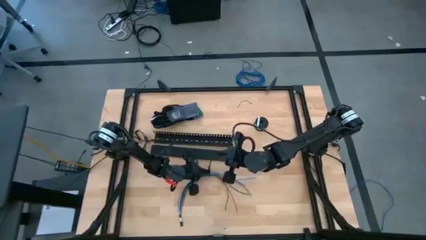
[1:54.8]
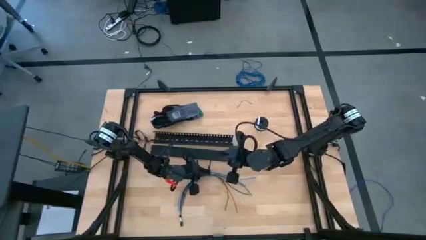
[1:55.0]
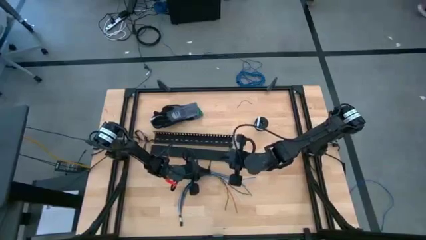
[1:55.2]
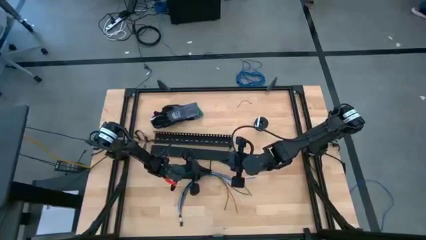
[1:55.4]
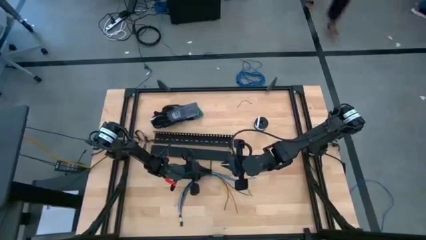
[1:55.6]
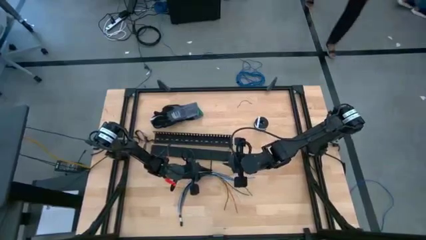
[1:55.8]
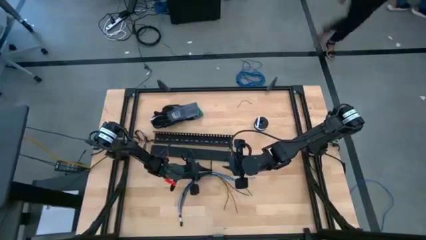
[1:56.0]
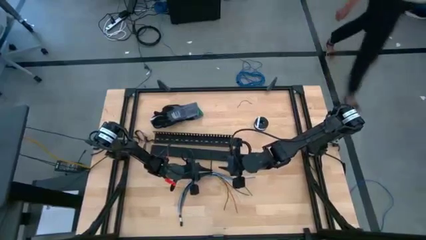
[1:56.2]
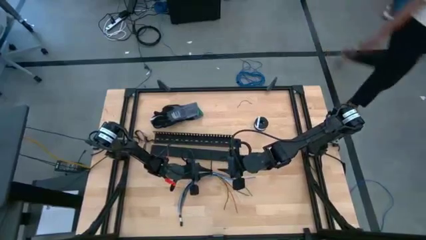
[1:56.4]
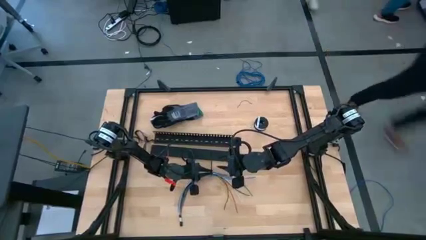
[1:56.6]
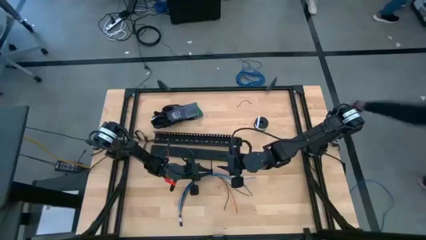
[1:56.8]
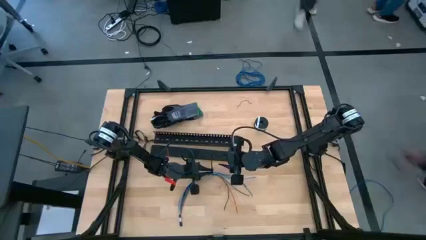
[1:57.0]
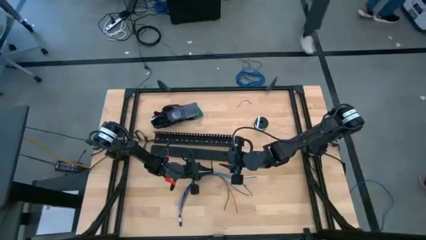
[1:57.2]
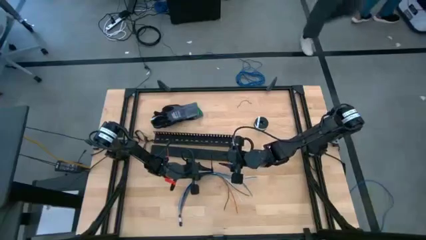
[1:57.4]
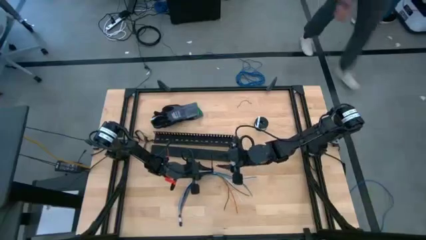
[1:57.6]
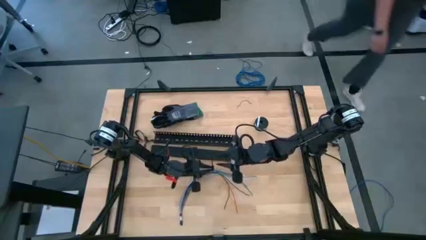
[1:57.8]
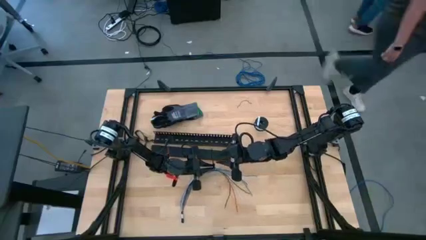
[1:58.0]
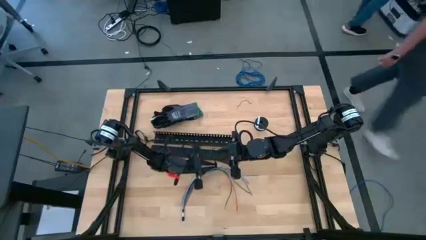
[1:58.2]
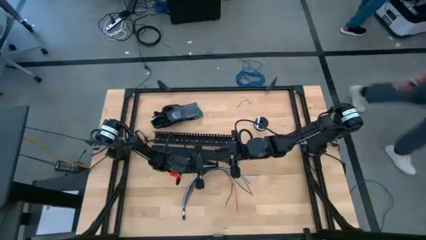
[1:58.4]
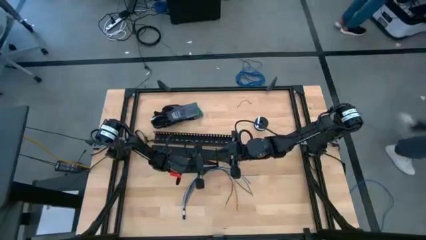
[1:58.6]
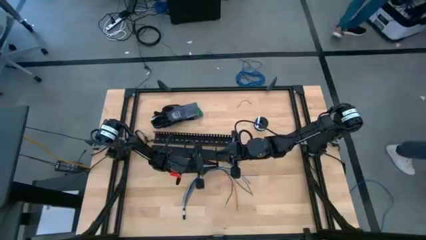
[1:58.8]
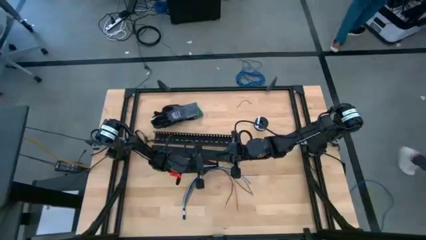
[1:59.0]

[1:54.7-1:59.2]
Task: Ziptie cables
Wrap the right black zip tie on the cables

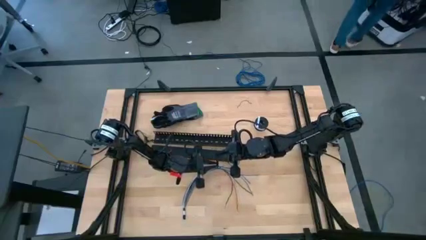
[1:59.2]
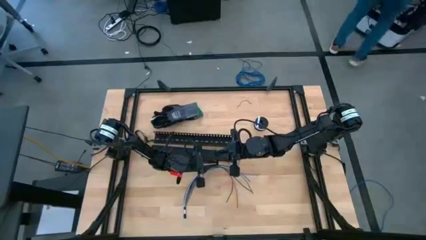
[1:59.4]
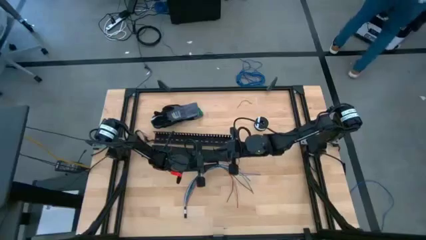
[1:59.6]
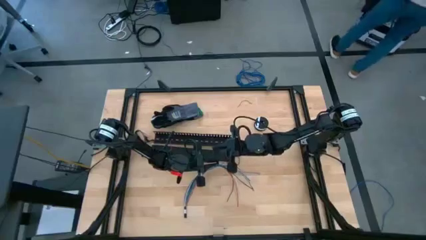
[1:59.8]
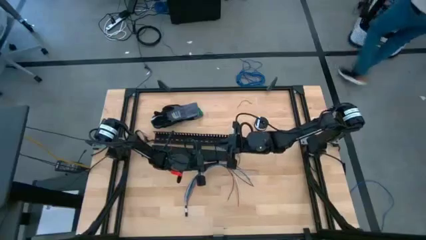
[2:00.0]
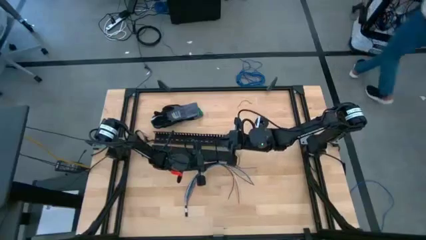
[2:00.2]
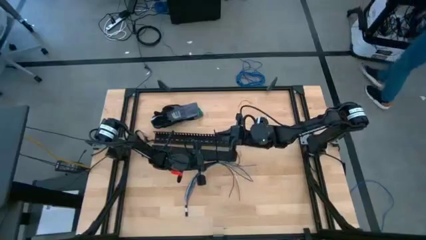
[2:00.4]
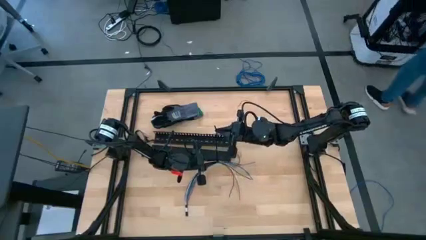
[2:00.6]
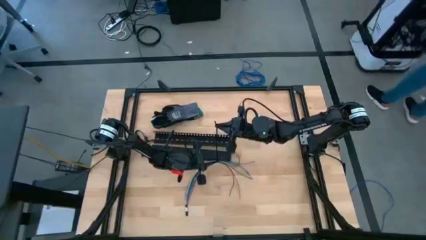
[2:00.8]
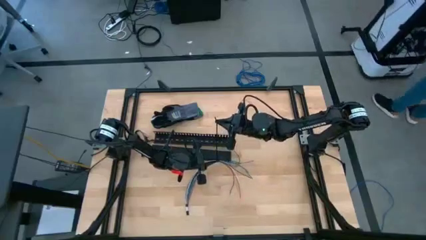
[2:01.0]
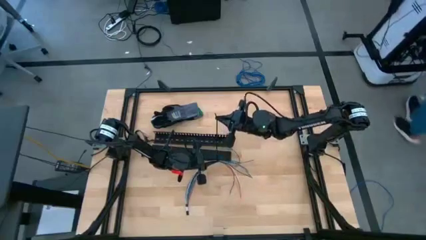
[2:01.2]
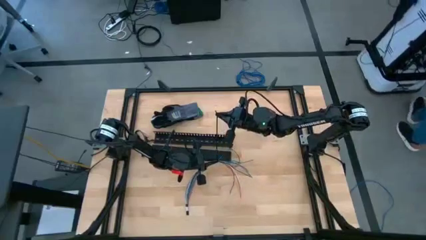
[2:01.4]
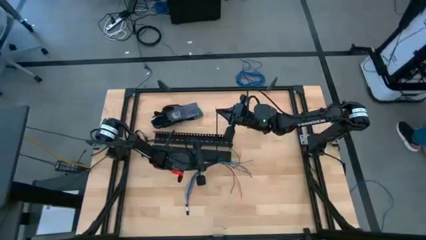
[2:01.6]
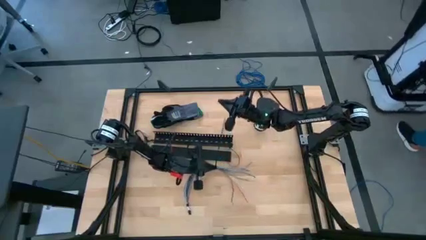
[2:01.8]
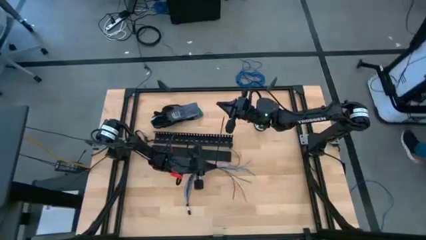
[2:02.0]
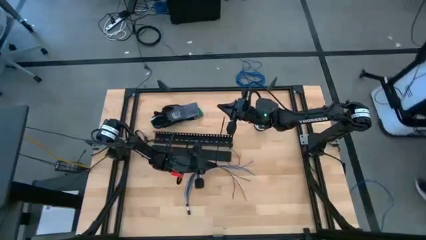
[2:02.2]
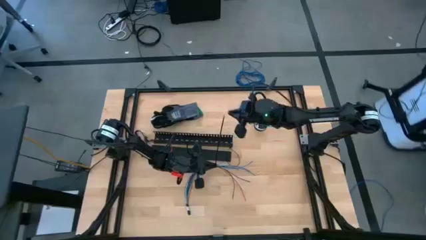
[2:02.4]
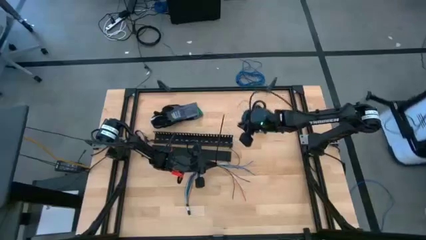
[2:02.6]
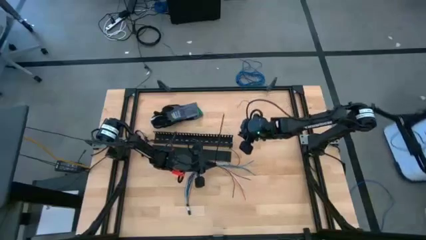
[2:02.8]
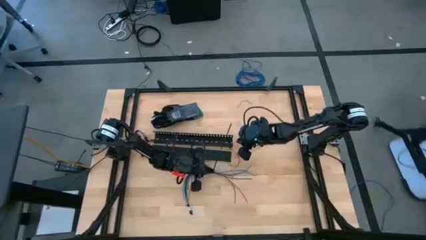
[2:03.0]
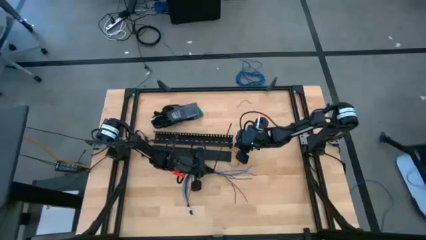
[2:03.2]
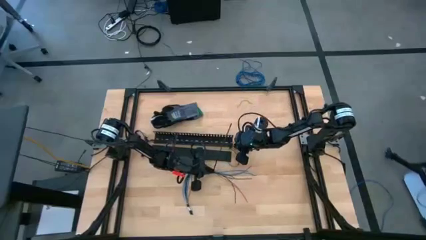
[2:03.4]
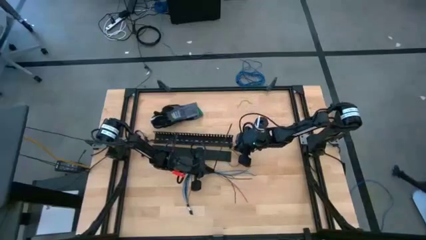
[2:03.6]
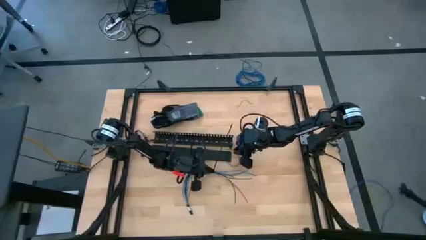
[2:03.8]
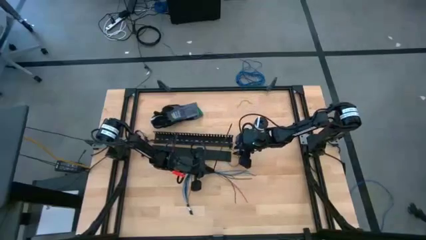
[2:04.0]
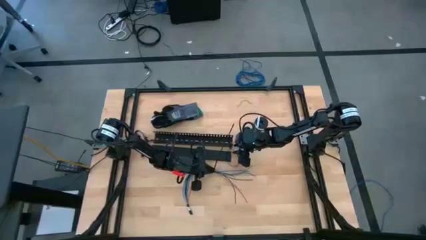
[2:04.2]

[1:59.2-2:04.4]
Wrap the right black zip tie on the cables

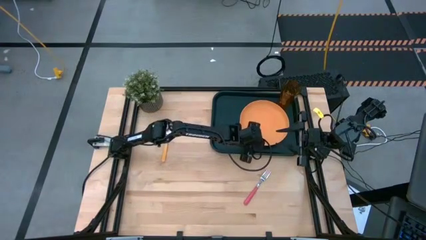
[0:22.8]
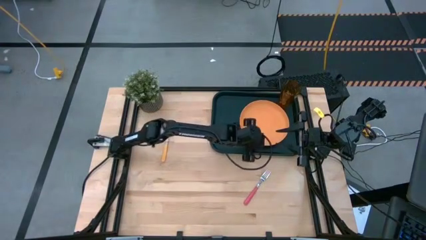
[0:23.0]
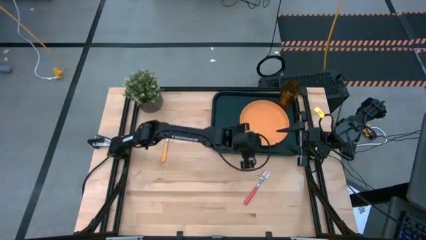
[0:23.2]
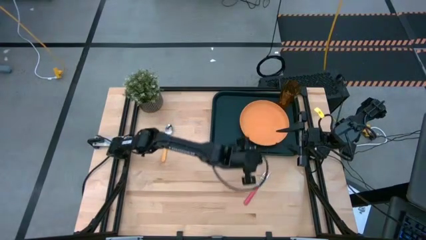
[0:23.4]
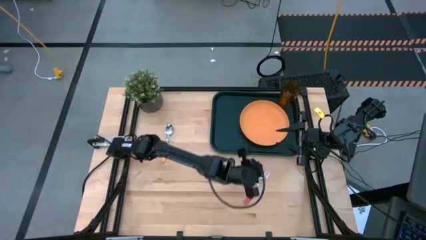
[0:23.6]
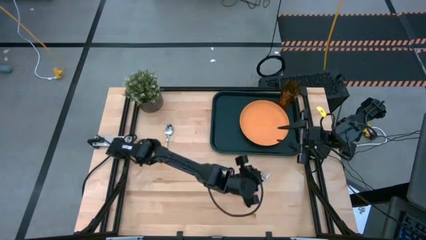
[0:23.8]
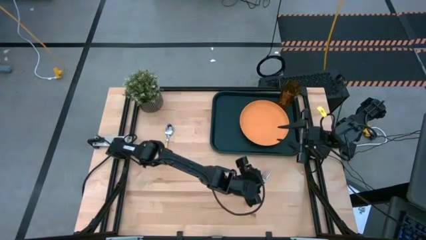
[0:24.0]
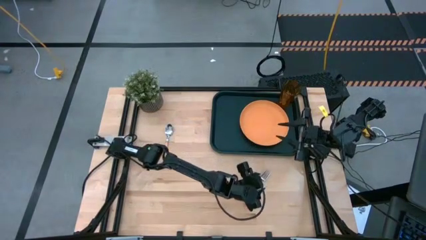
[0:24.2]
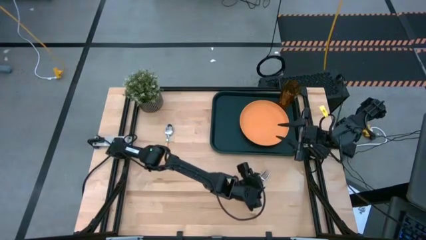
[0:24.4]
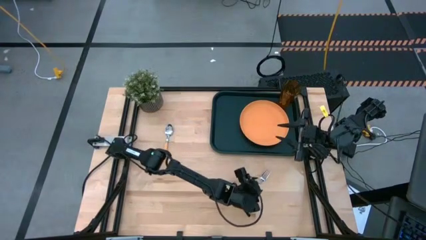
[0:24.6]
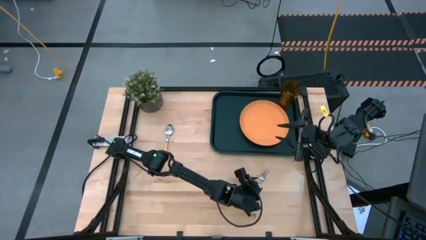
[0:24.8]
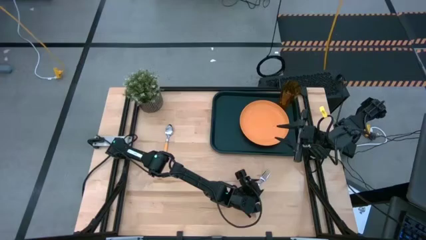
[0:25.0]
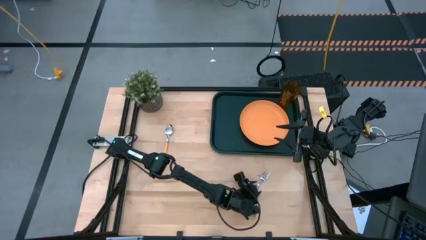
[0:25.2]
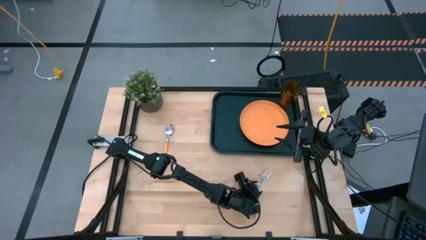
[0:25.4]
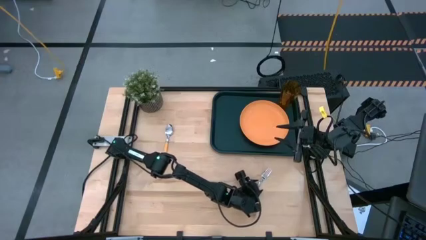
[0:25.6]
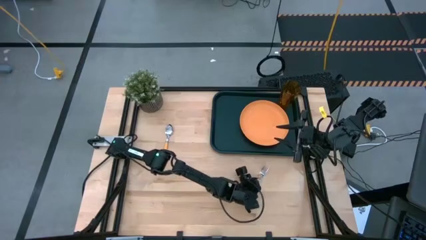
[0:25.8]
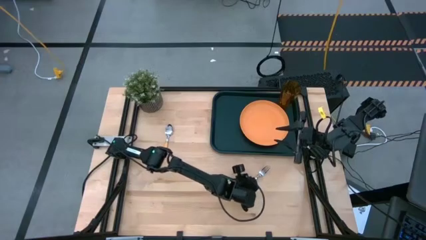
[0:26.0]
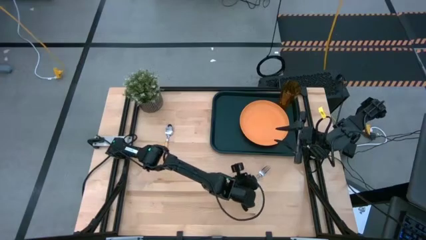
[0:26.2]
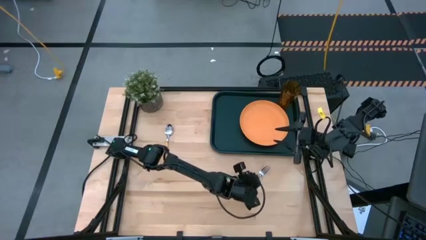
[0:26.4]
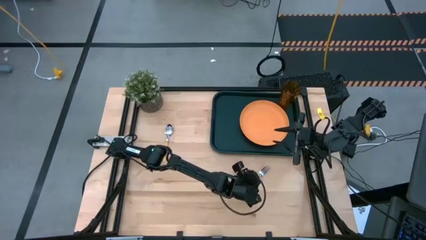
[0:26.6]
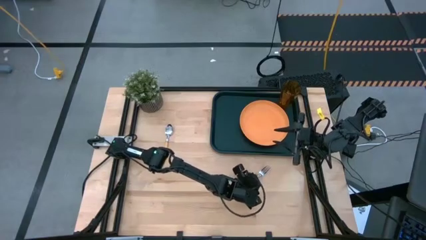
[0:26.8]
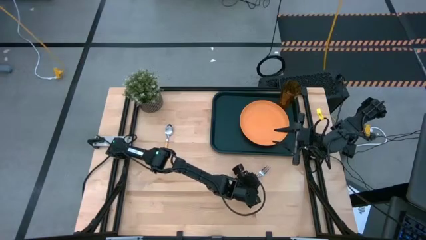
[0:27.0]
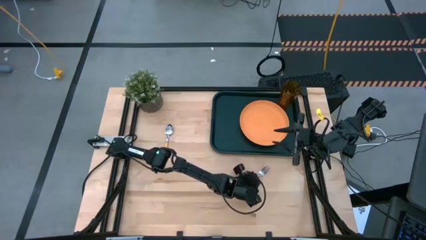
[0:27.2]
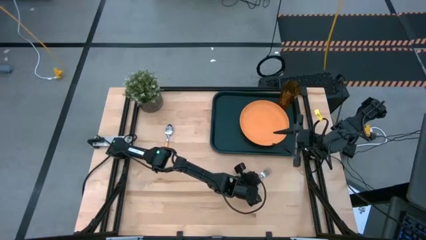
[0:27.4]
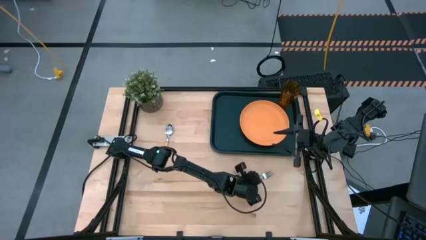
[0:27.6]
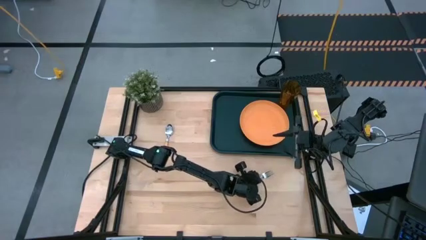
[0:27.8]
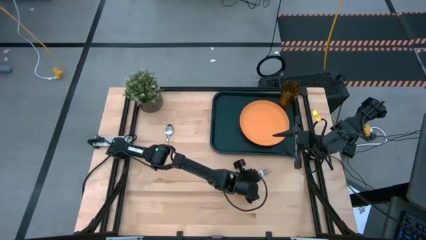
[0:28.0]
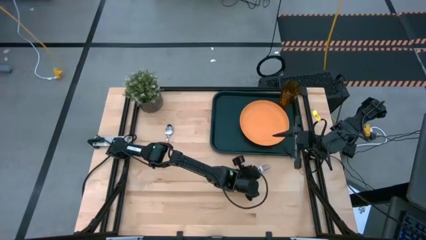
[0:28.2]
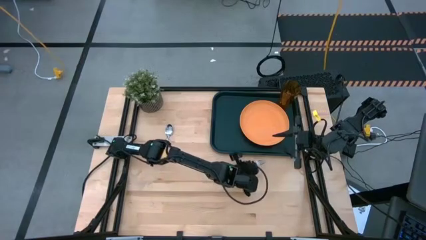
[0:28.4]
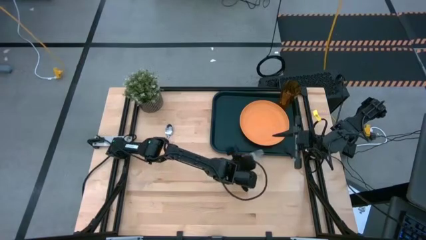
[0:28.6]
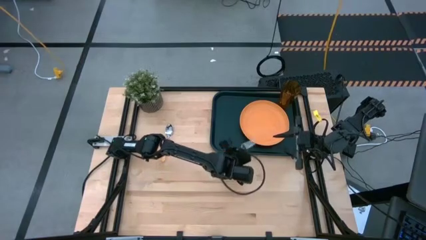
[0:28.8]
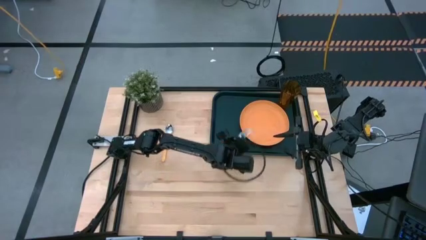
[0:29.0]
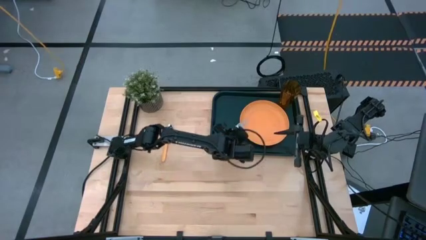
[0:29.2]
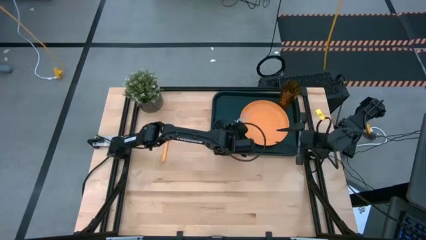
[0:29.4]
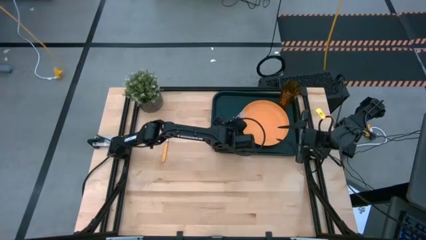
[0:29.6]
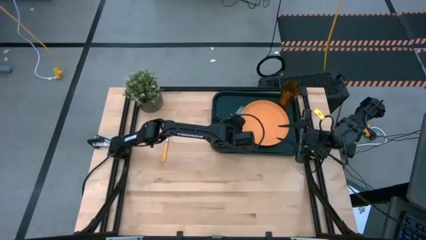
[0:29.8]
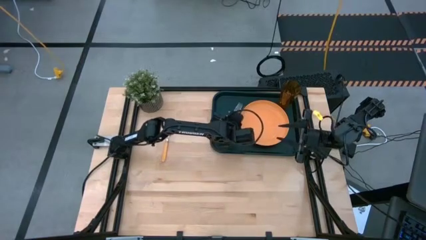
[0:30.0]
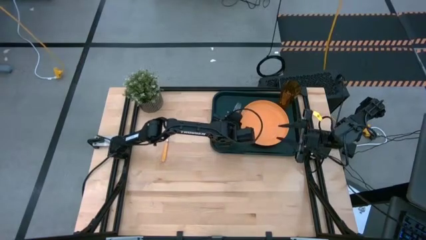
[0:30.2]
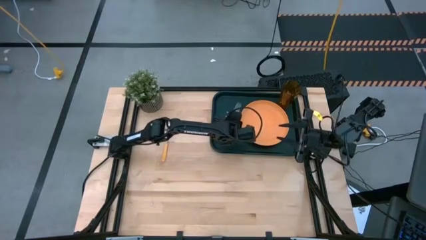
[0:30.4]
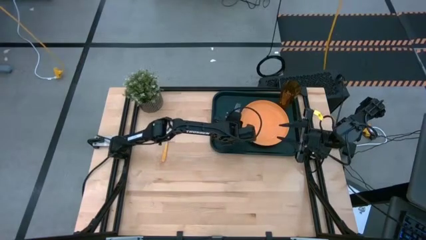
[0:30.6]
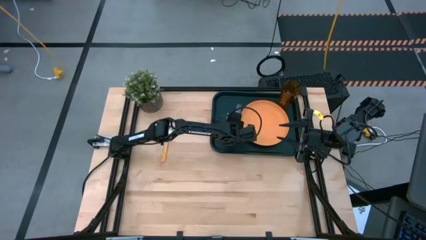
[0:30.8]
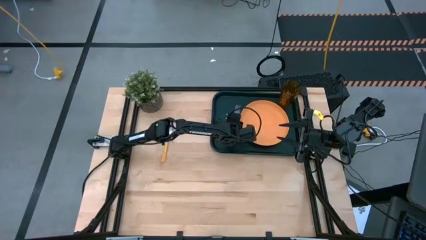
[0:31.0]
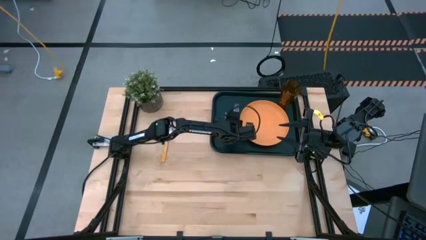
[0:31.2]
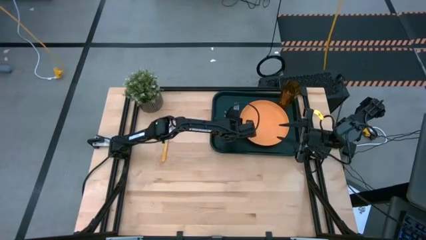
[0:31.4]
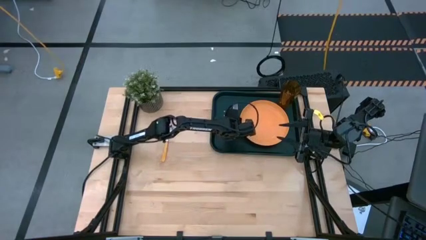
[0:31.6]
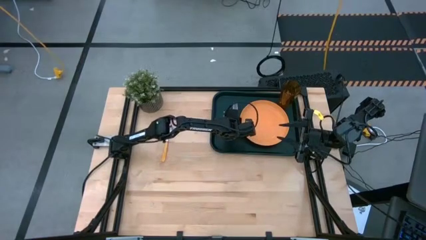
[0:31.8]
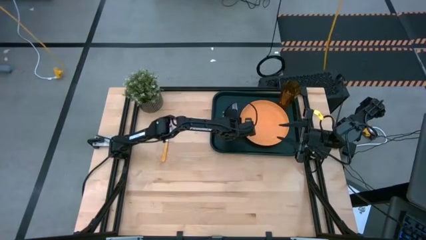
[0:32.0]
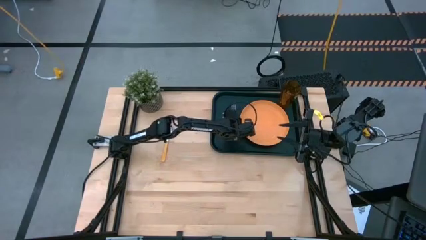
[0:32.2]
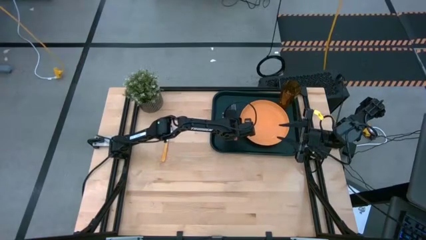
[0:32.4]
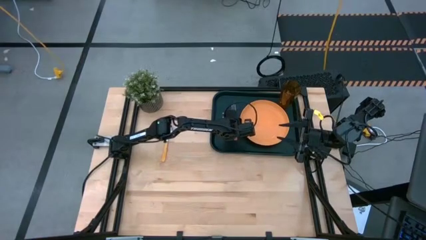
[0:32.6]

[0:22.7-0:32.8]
Task: Pick and place plate/cup/fork/spoon on tray
Put the pink fork on the left side of the orange plate
